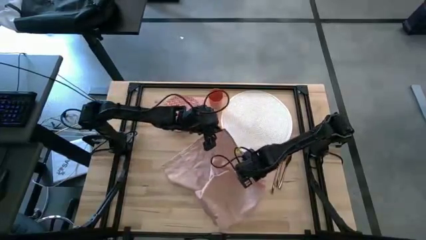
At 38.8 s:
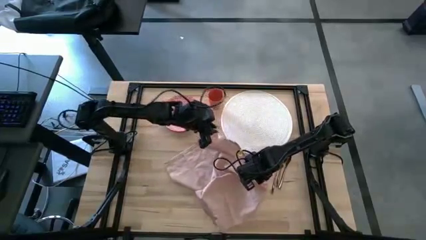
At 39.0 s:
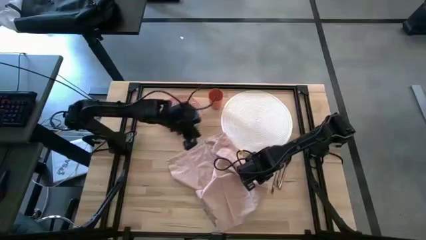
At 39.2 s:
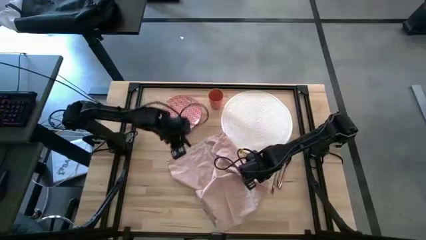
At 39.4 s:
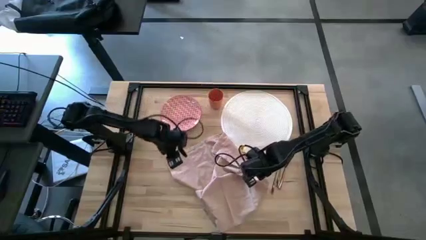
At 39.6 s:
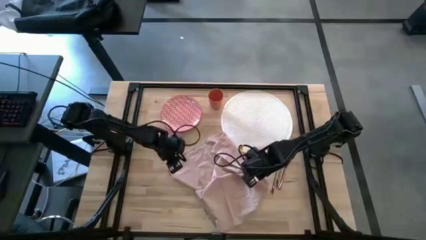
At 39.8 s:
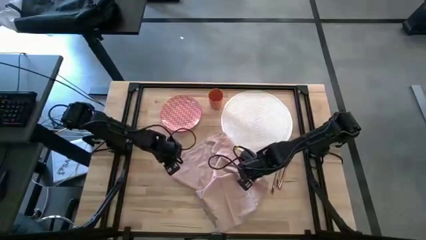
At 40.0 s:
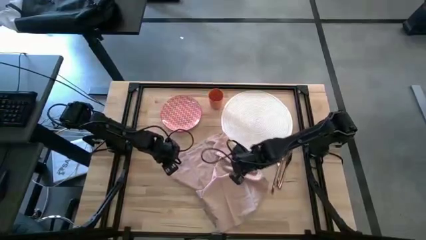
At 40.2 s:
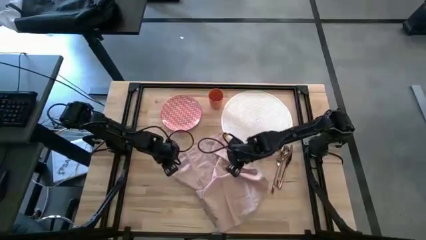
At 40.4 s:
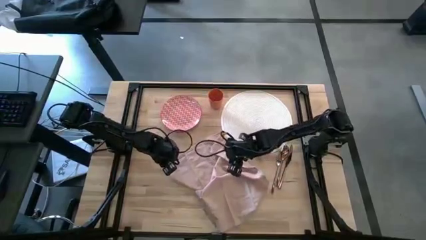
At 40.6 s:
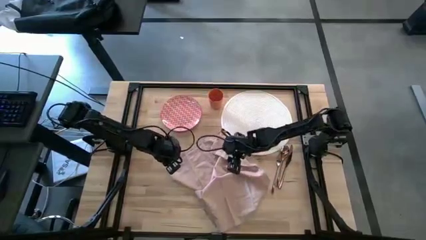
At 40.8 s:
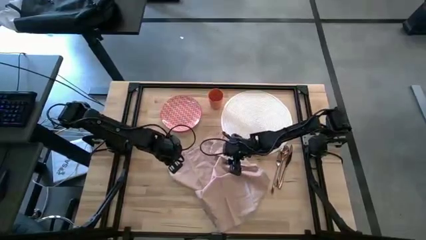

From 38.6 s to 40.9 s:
Task: Set table place
Fold the pink napkin

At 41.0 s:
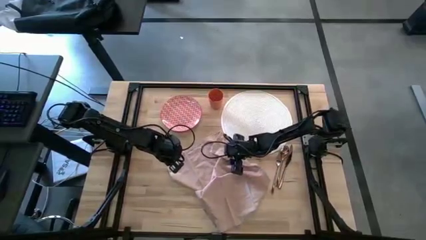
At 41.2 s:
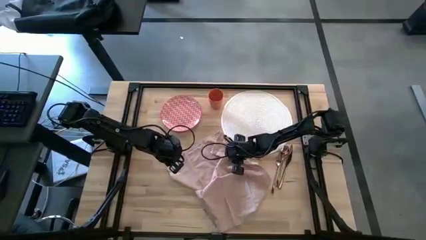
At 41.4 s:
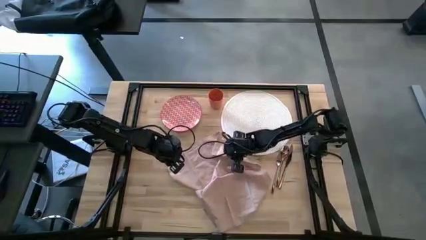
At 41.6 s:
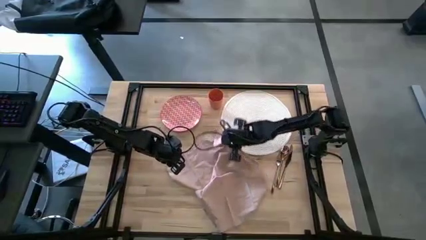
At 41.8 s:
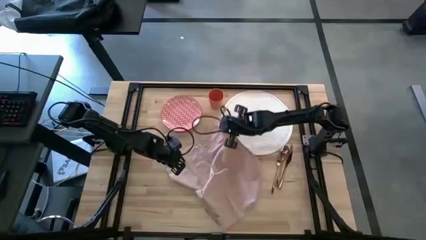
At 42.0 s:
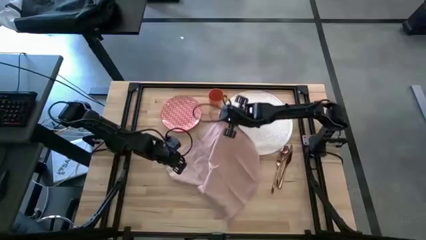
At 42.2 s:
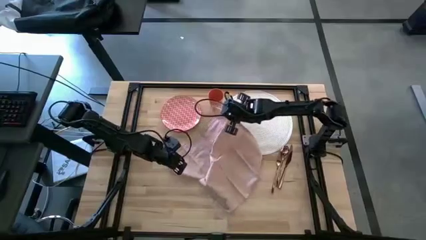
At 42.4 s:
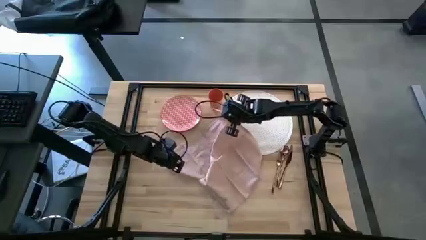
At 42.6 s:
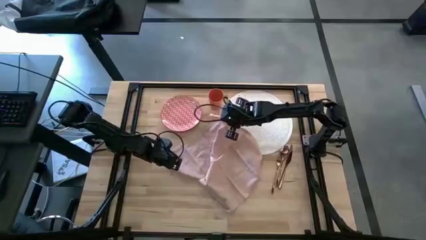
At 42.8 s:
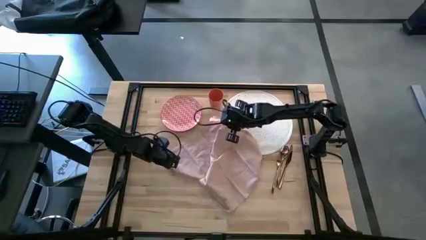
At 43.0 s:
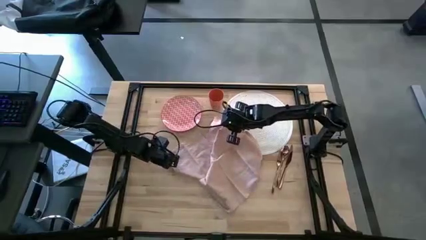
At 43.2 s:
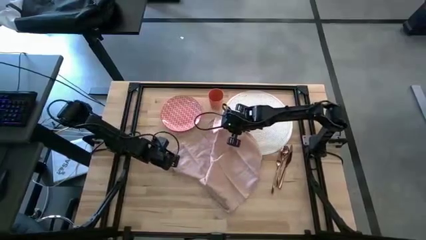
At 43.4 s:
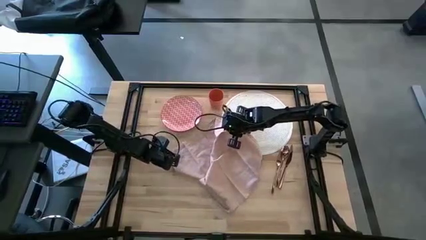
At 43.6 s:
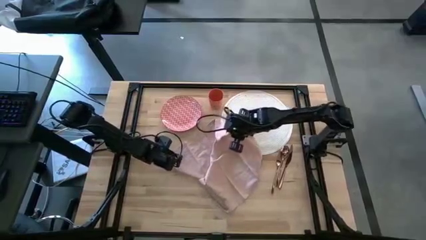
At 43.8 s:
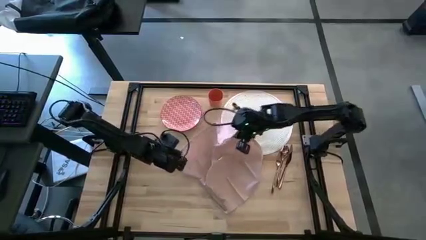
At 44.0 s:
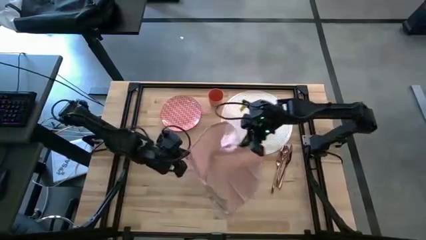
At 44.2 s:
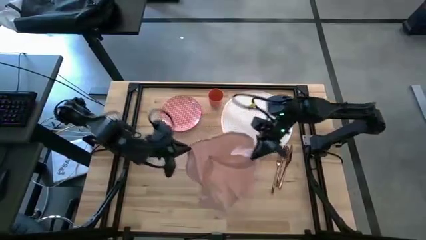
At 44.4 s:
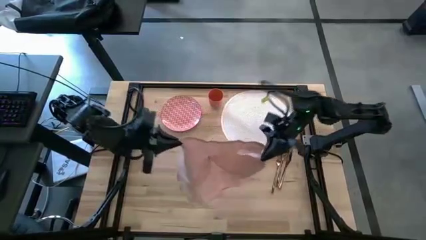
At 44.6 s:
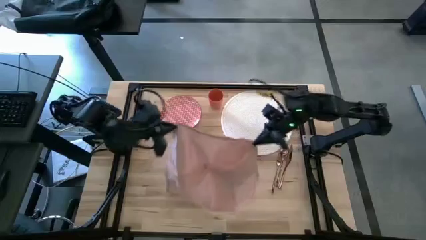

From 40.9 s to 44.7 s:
Fold the pink napkin

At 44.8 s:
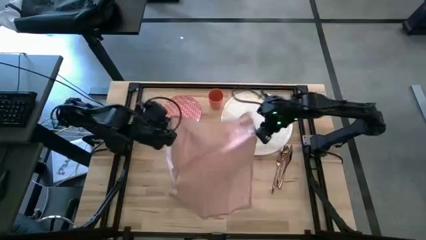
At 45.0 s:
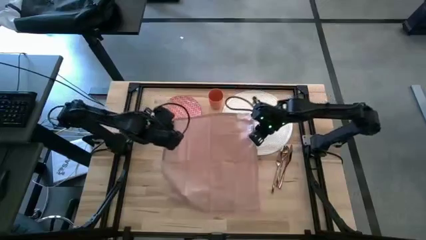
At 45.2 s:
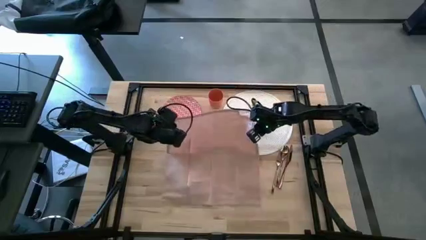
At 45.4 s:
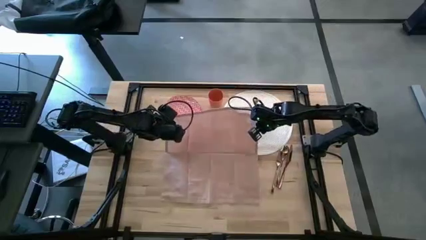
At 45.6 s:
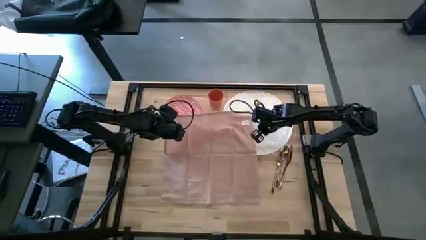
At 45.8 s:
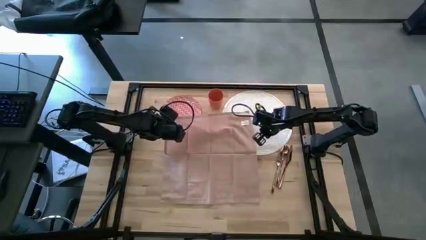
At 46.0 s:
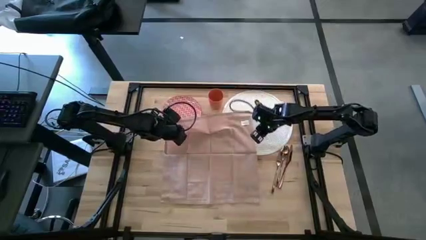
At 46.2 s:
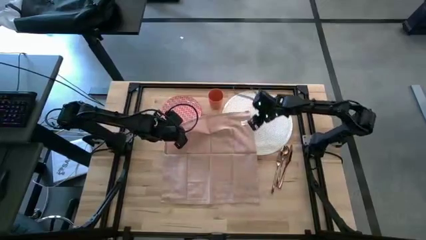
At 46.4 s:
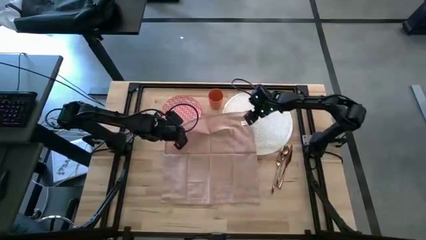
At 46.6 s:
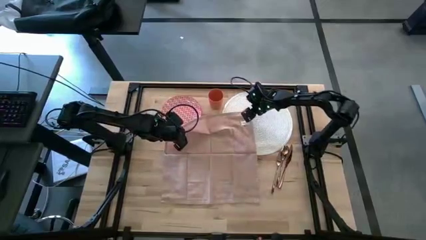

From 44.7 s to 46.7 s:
Fold the pink napkin

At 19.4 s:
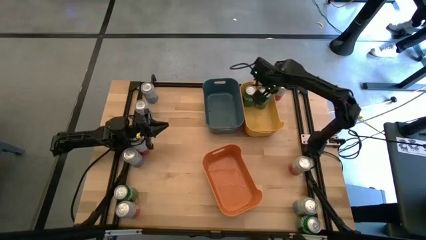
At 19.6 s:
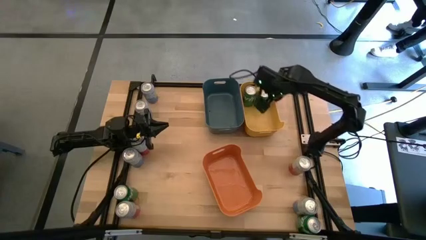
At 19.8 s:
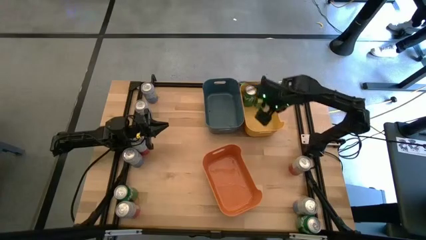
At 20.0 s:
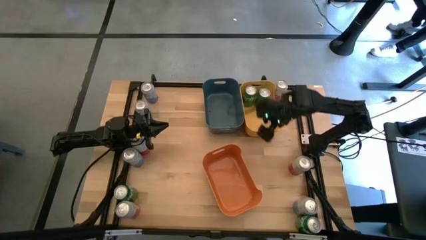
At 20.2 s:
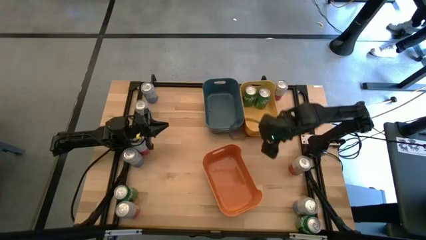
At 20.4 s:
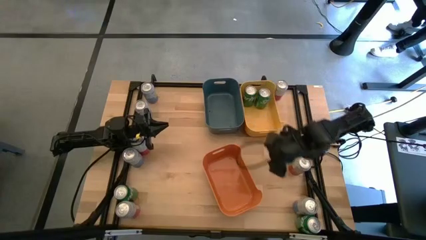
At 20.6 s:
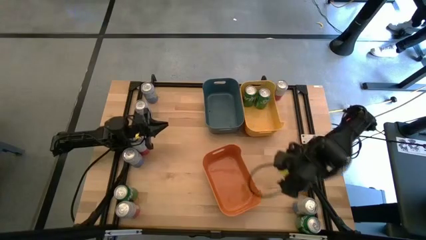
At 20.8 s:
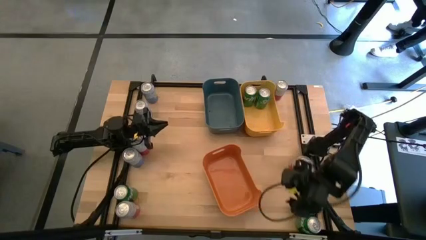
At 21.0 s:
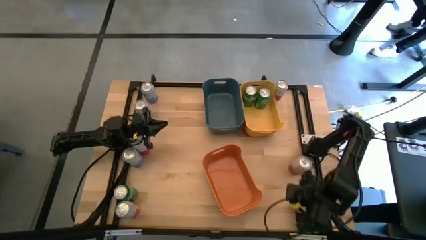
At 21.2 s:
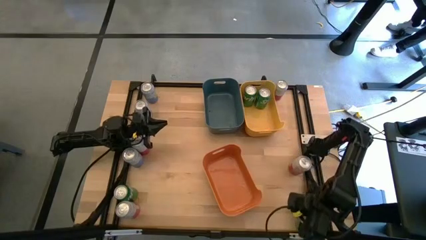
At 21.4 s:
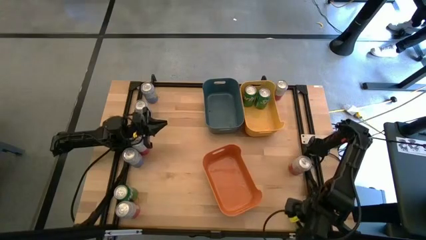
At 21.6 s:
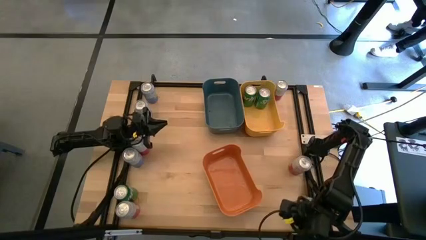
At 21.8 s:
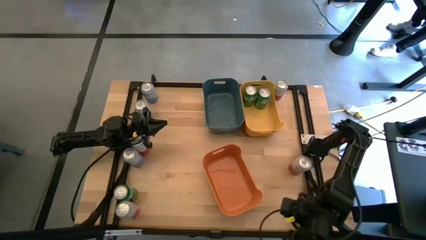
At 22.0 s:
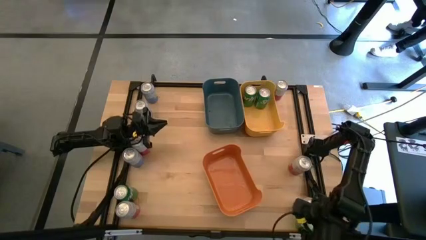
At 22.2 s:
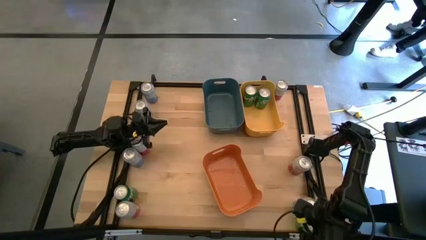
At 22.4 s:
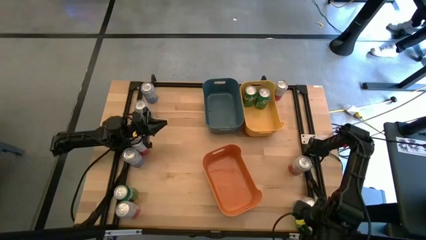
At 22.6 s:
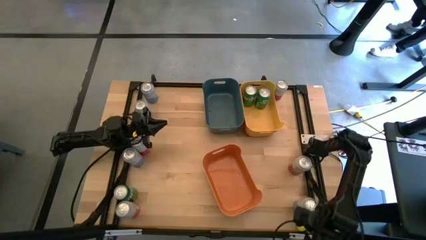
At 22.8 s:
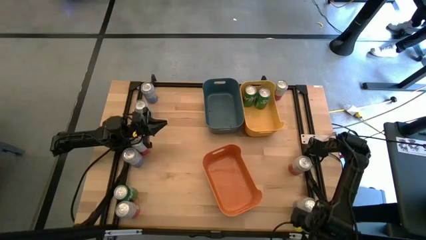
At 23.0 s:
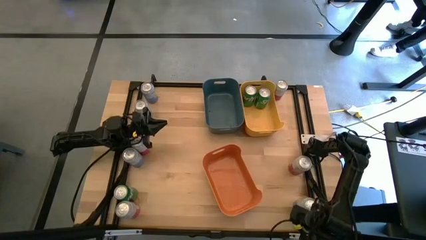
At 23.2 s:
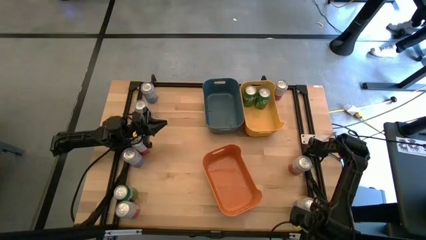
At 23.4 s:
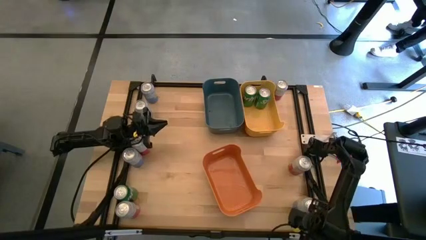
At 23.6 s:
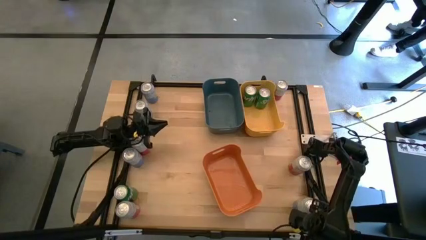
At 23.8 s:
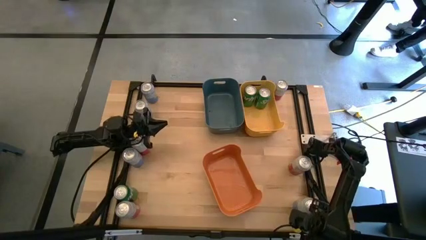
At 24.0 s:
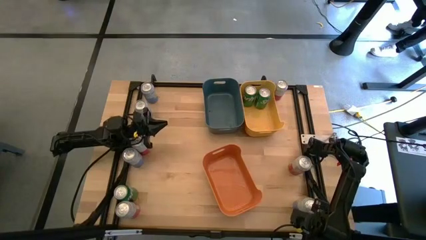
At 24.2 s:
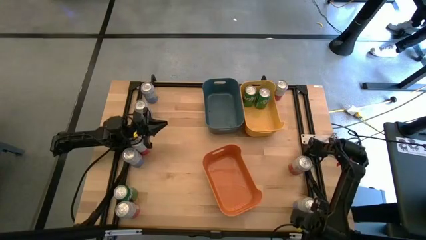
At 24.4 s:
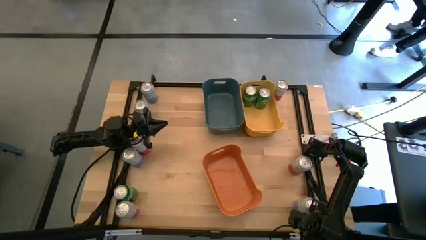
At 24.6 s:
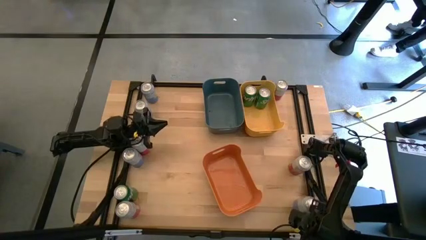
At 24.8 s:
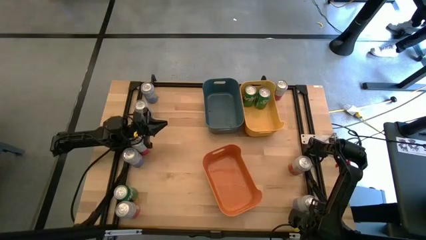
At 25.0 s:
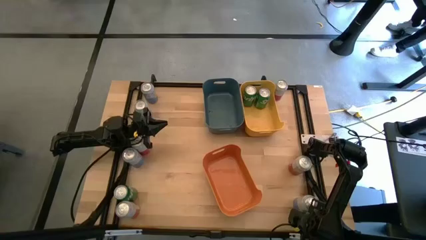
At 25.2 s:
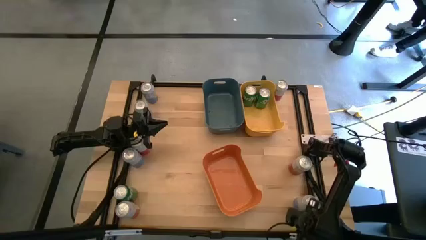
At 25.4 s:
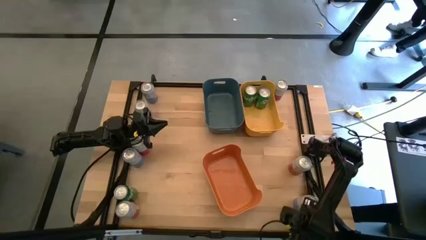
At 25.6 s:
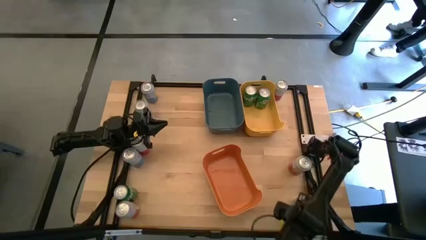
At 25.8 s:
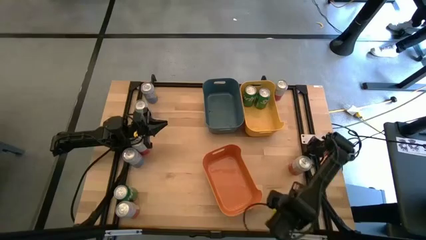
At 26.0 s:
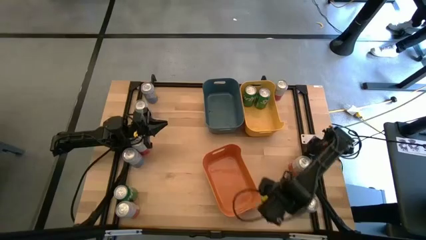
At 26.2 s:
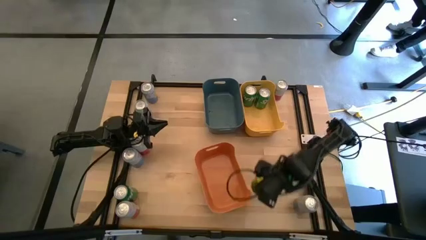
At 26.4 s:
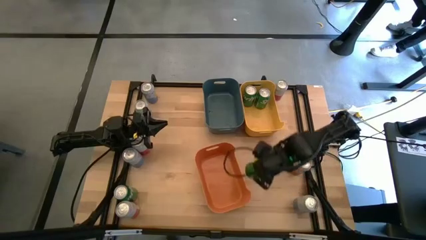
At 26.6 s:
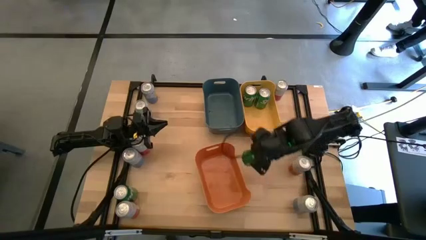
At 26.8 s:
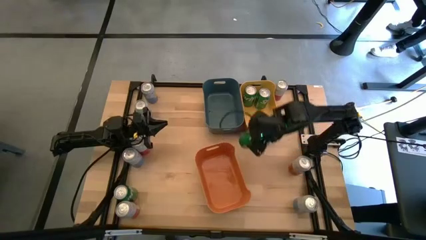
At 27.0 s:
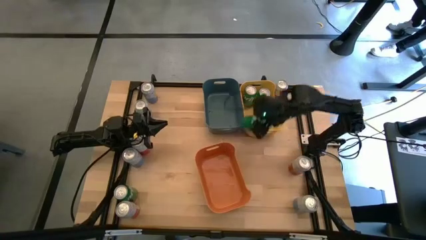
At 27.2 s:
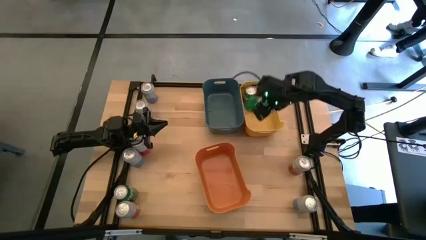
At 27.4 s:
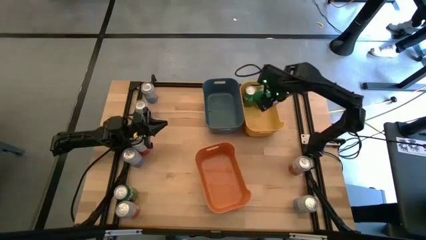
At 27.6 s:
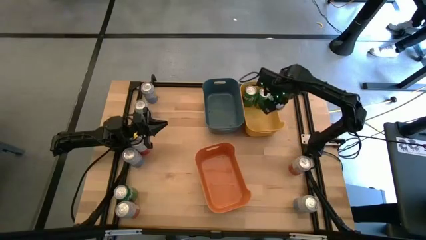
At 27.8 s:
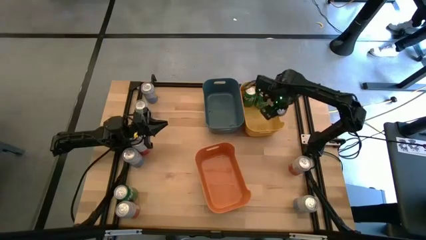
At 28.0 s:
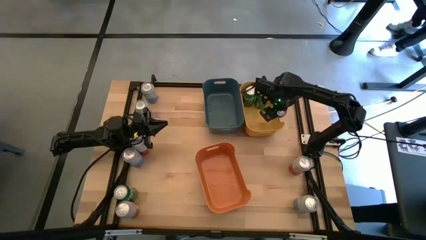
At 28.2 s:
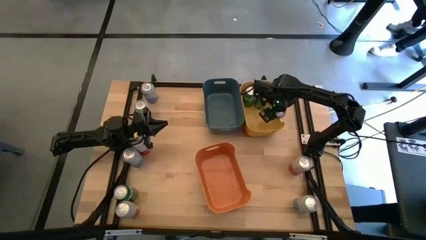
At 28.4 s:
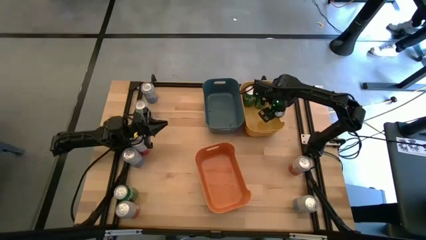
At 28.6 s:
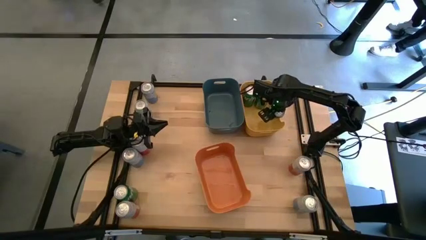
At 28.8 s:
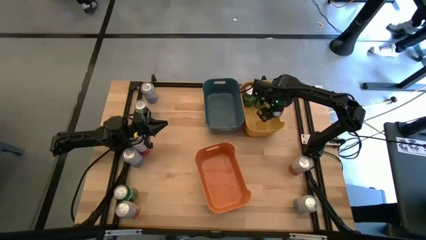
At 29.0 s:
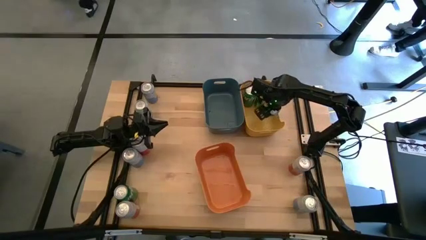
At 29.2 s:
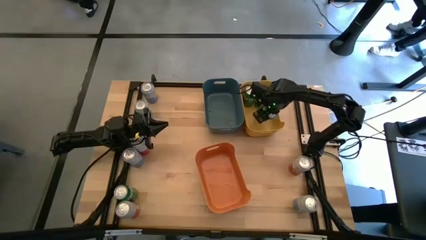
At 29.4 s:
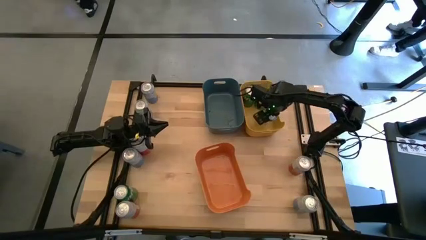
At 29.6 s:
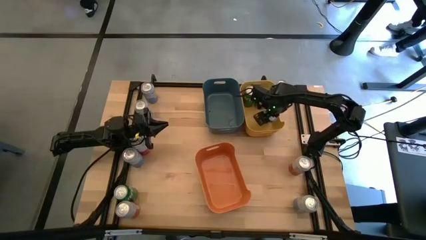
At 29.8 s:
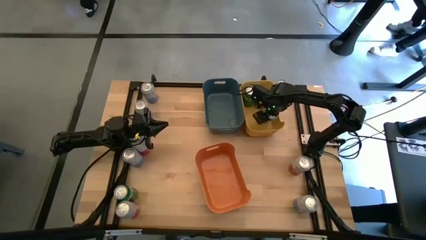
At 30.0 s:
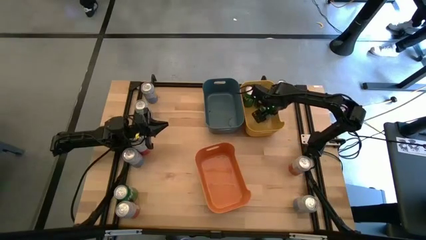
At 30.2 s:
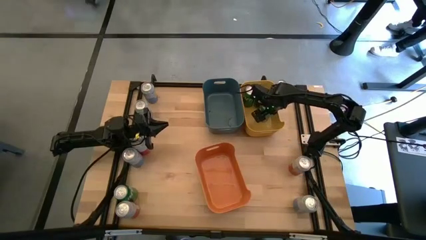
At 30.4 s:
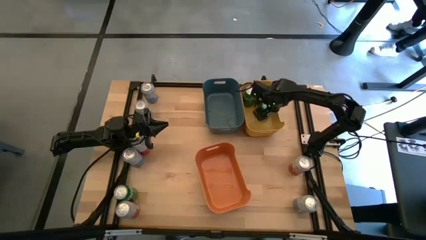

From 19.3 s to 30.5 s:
Task: Sort soda cans
Put the green soda can into the yellow bin
